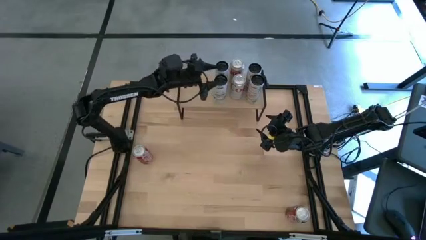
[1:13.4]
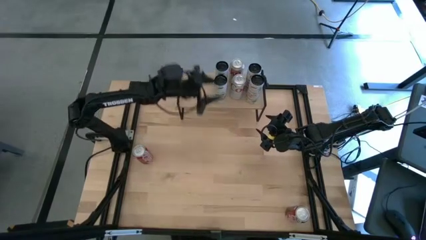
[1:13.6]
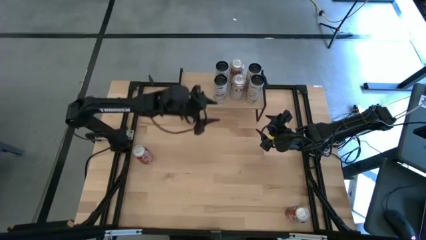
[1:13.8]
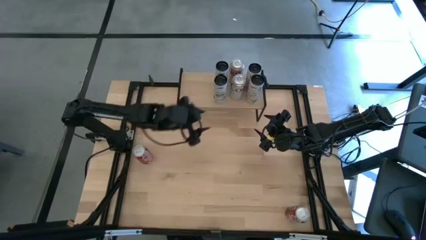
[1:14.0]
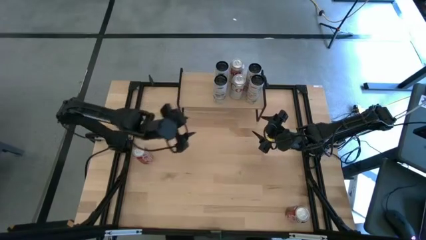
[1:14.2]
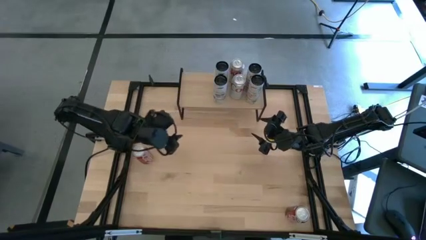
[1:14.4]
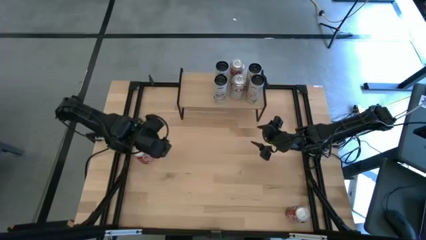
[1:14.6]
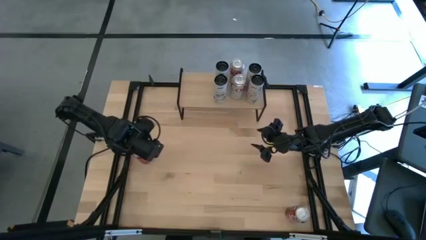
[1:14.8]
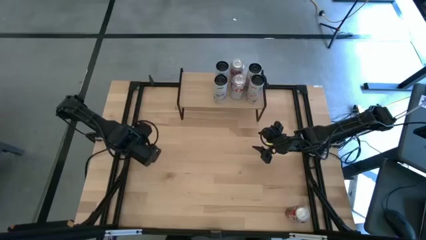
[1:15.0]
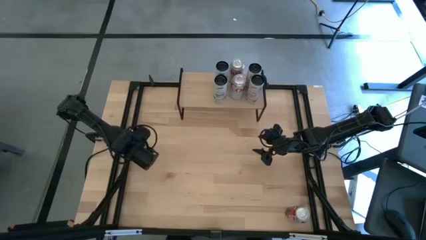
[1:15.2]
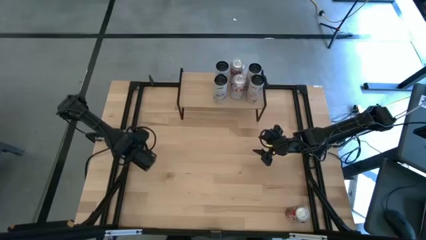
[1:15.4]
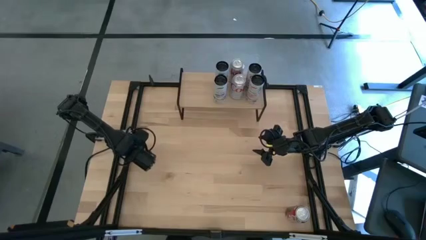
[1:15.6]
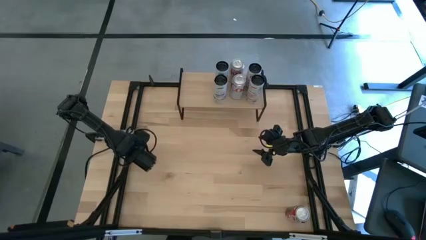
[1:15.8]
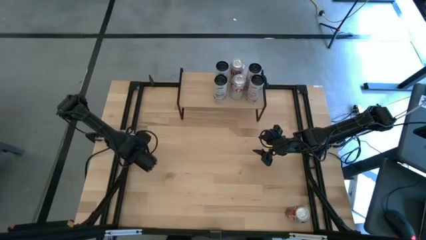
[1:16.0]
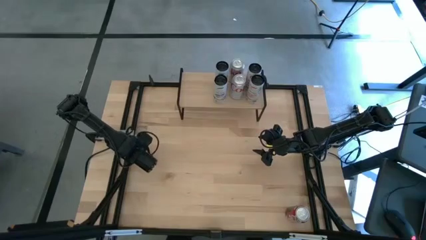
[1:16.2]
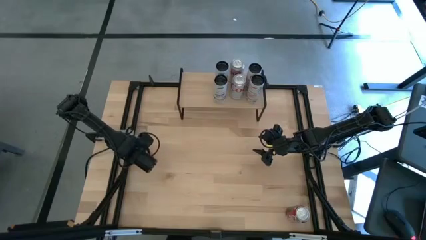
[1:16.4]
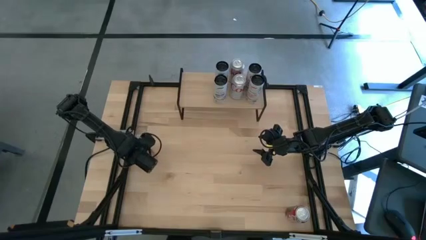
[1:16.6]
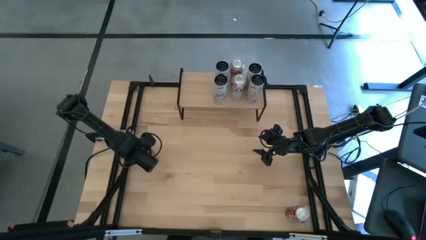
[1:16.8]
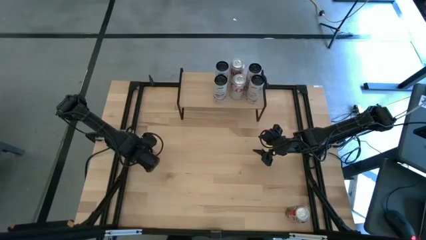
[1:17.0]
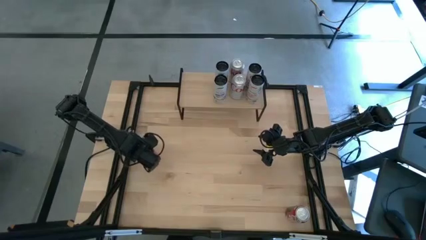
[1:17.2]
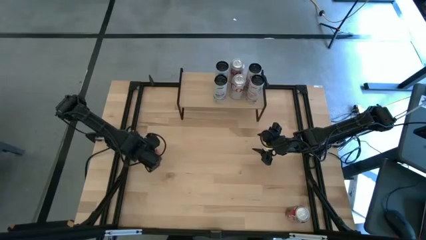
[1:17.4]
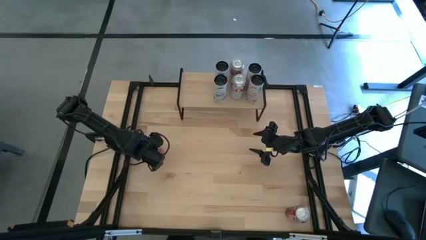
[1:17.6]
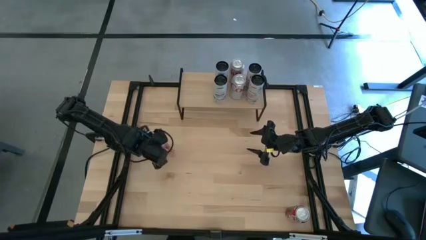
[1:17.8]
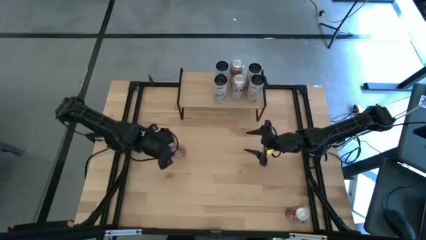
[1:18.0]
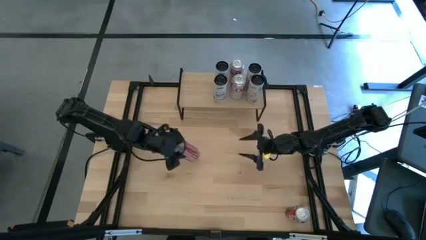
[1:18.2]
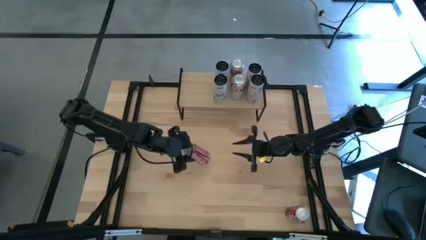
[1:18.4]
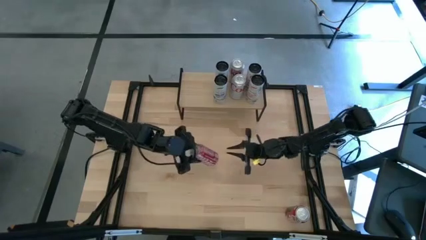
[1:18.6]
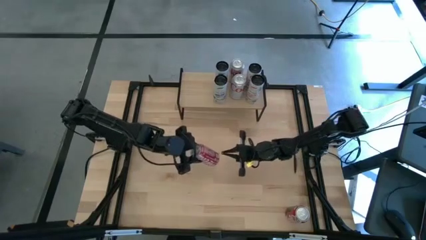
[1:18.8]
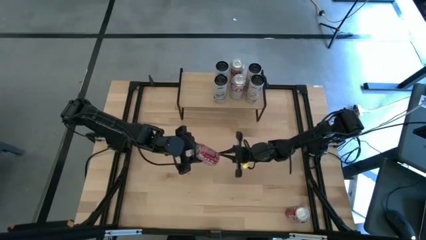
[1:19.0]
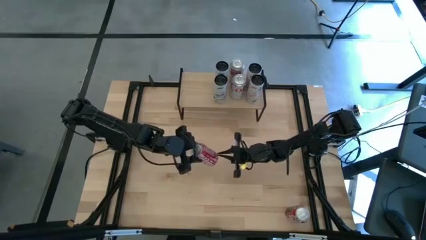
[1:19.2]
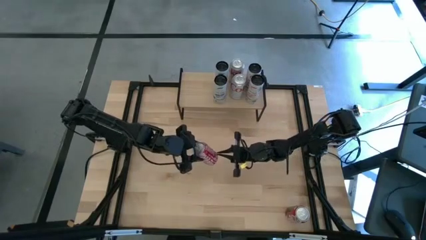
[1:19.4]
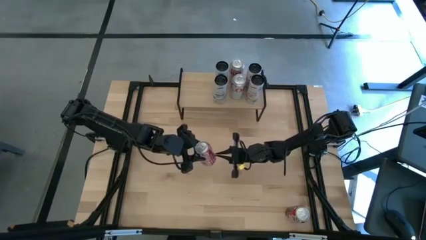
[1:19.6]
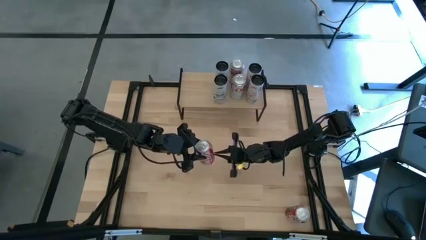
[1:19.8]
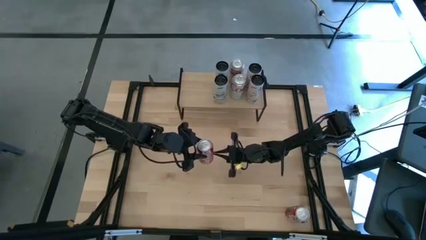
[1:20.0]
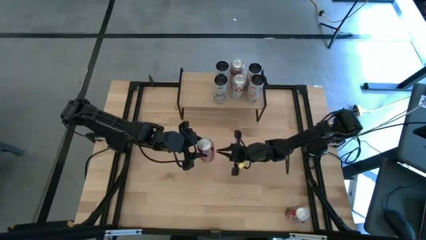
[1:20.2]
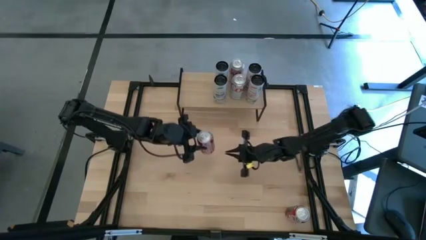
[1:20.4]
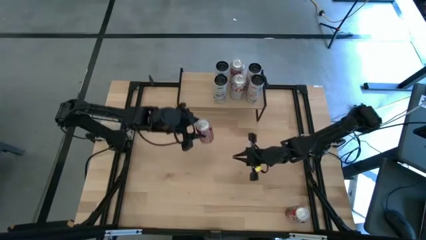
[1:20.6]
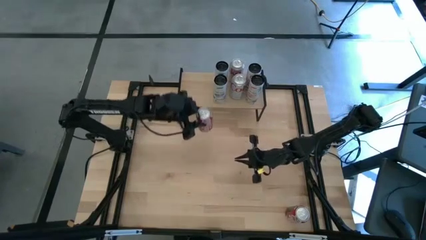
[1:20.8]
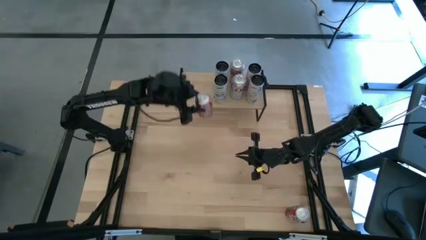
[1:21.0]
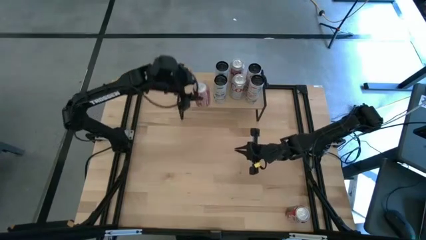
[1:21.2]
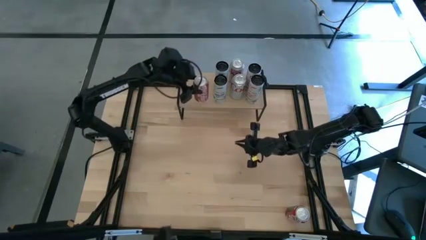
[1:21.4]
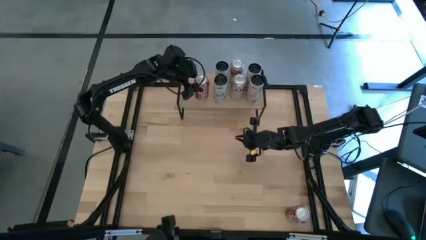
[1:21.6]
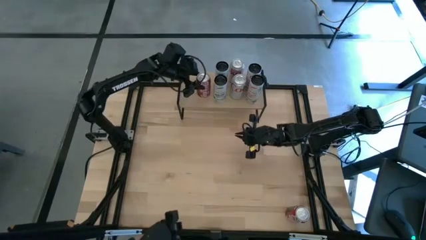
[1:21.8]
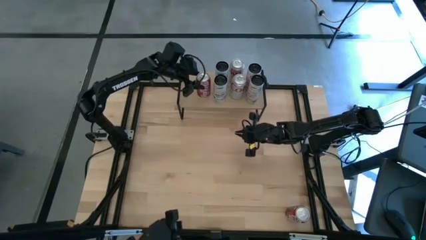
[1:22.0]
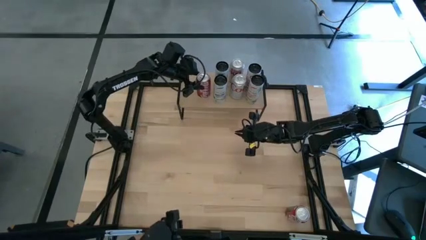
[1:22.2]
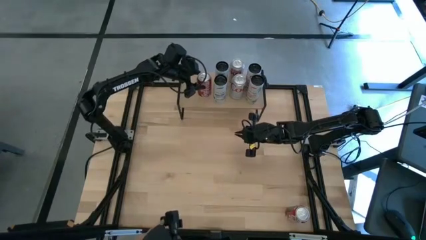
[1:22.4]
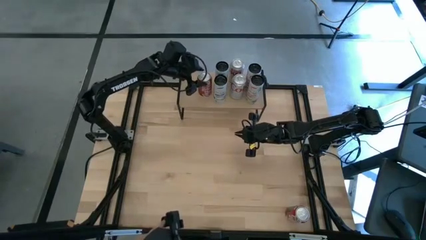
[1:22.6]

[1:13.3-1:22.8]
Task: Place canned beverage on shelf
Put the top red-white soda can on the shelf

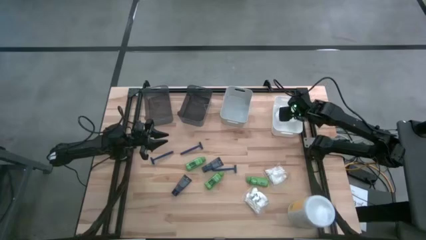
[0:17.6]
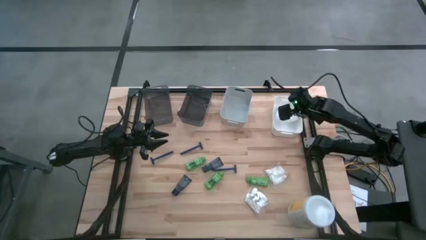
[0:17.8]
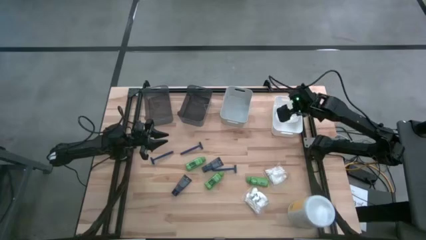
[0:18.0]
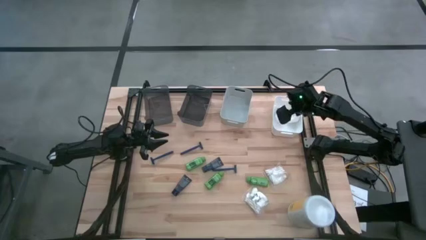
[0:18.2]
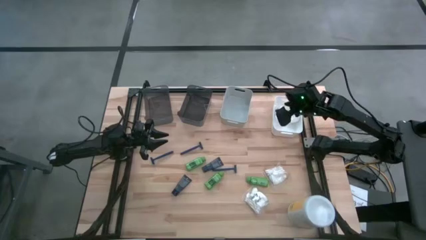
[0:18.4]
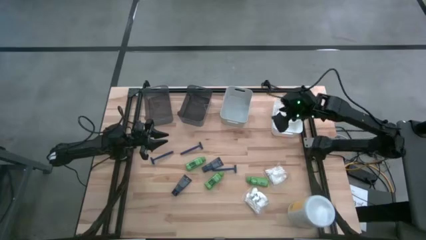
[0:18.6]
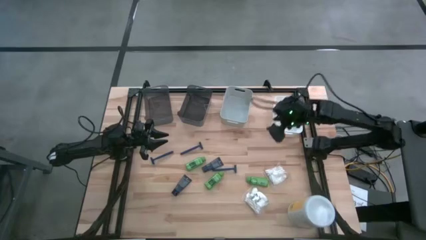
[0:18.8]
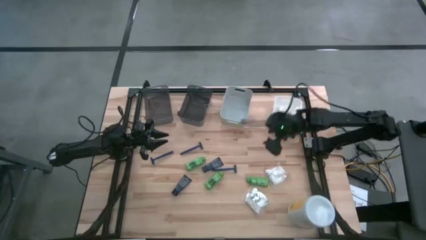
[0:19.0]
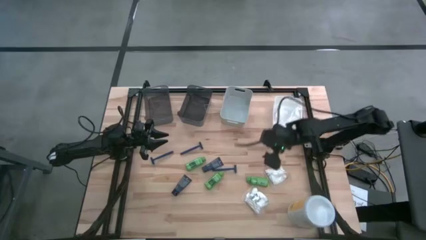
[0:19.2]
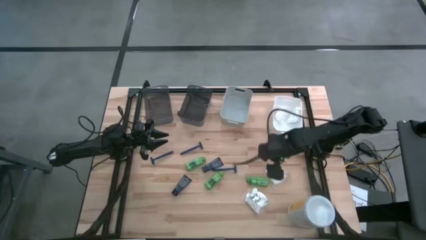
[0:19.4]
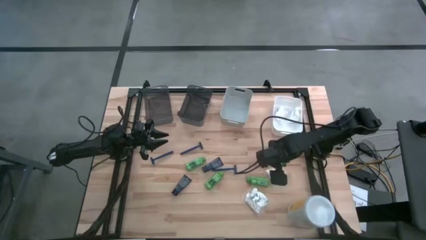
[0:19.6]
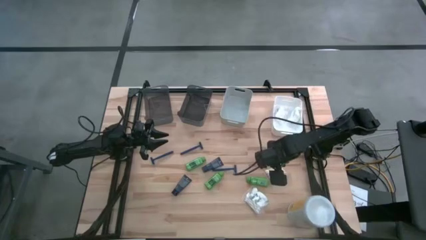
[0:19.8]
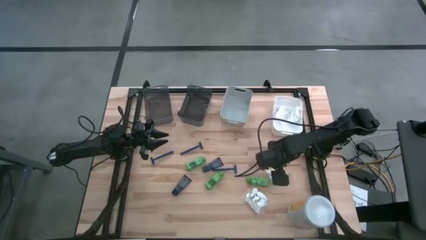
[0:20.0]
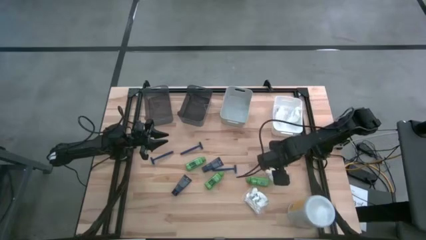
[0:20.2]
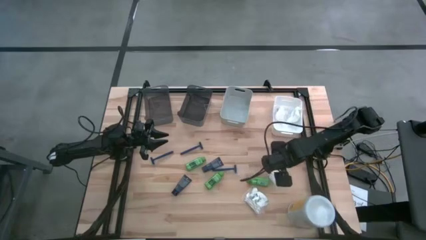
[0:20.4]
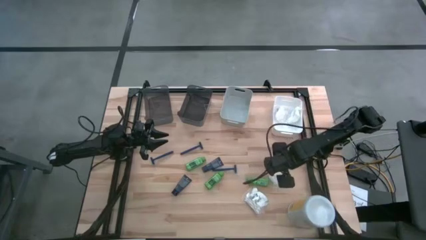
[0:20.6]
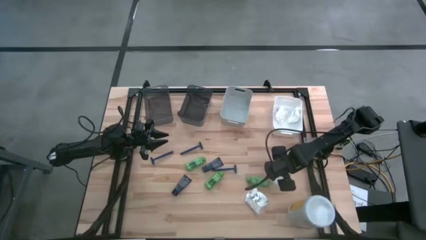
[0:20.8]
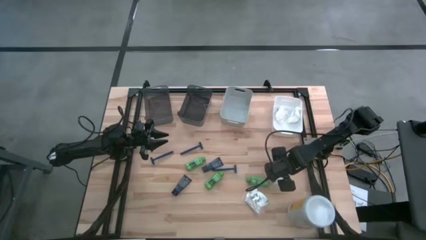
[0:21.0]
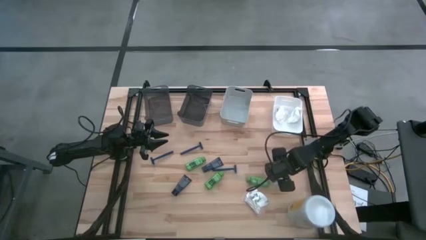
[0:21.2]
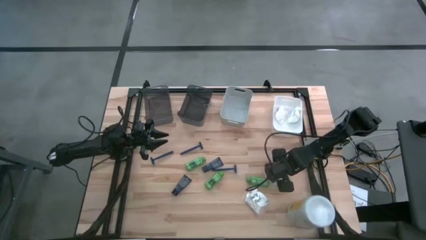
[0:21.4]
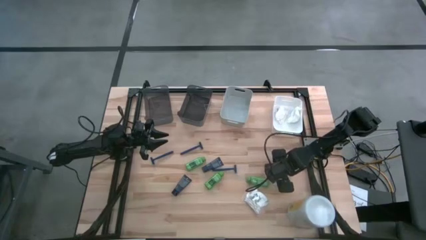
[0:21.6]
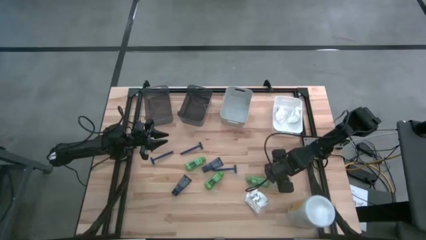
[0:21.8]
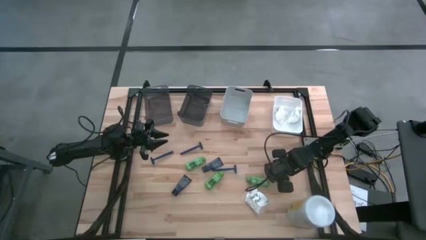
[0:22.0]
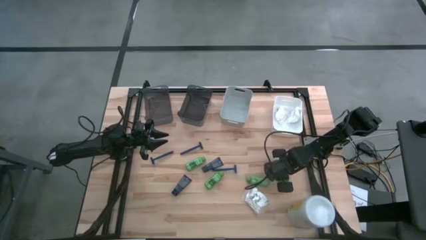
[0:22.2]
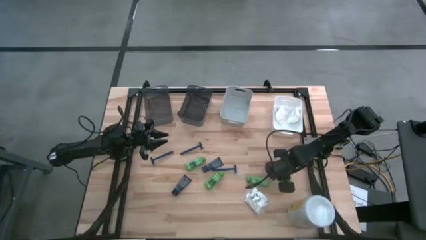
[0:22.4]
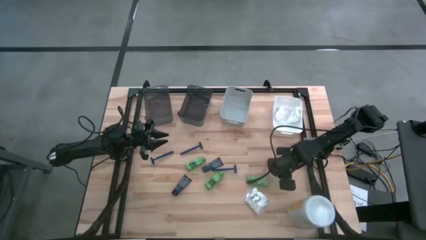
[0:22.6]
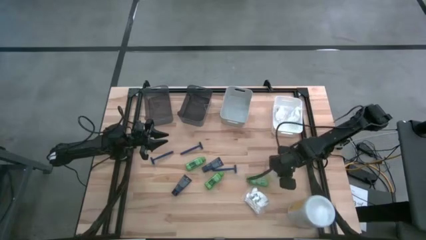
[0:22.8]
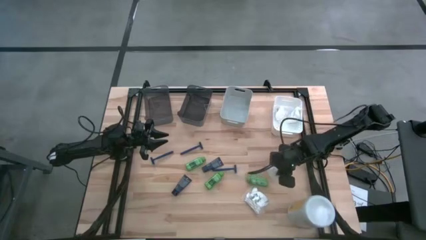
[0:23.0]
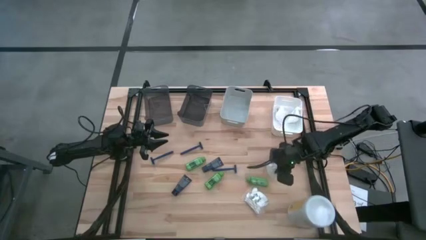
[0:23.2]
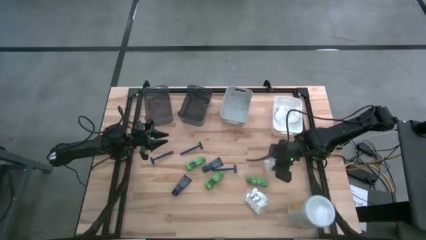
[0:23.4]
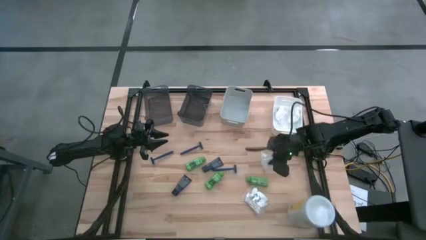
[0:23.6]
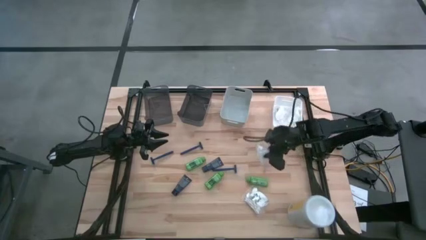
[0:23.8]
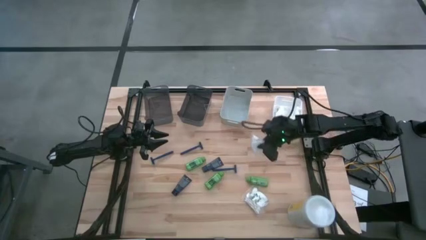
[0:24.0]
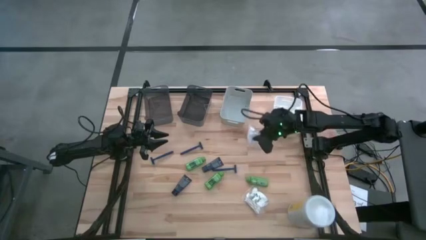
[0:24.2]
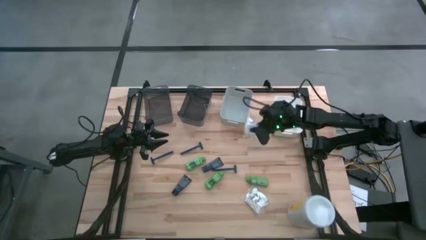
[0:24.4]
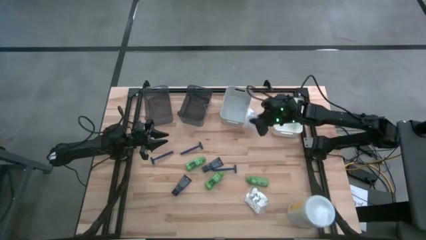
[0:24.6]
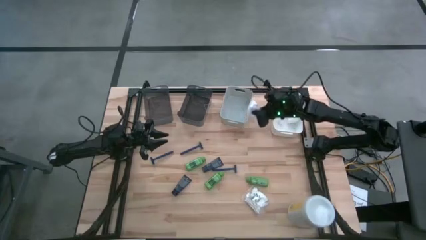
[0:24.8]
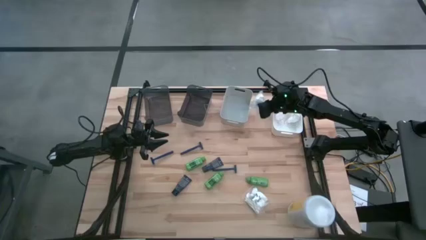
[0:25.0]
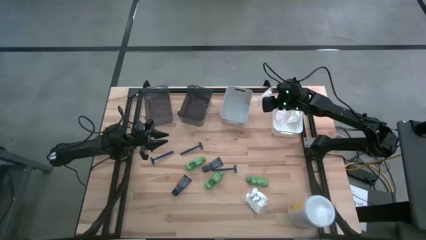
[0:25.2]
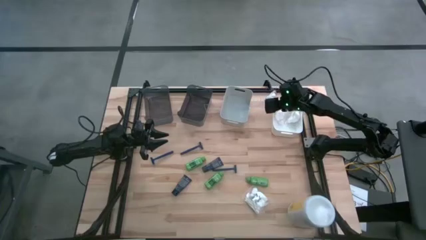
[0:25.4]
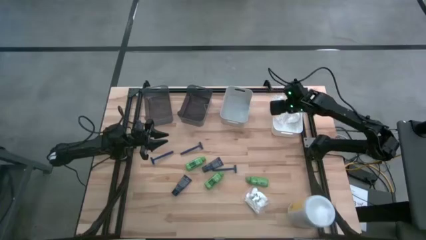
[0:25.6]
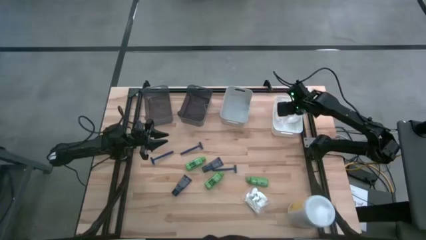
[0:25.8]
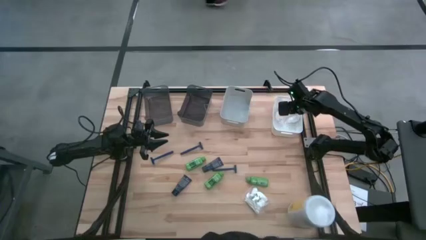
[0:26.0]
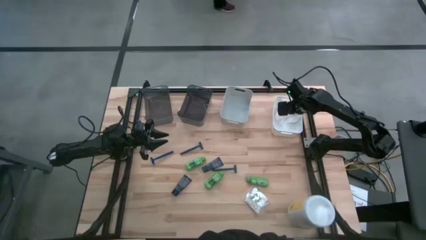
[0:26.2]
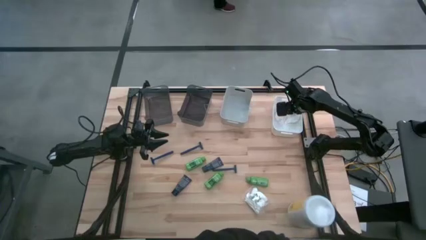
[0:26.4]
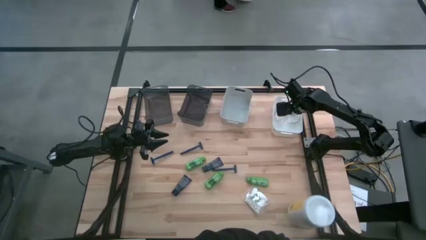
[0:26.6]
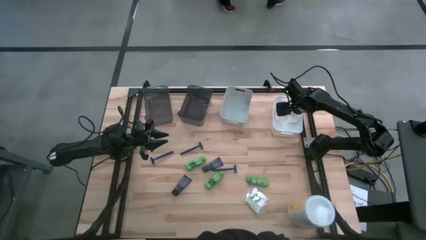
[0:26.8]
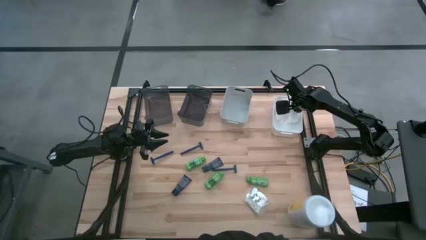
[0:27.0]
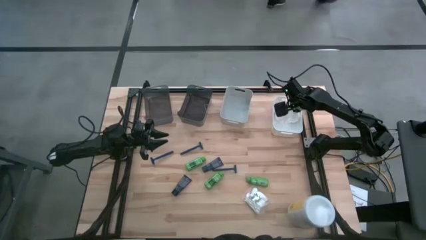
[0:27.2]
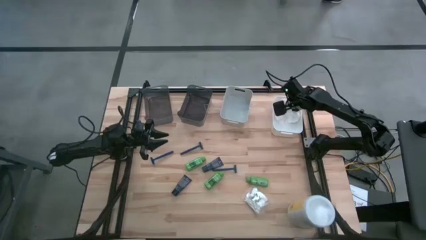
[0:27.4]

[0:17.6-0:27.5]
Task: Pick & Place Travel size toiletries
Put the white cotton pack into the white bin
